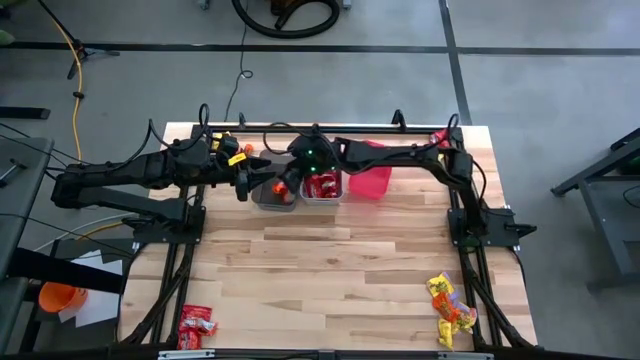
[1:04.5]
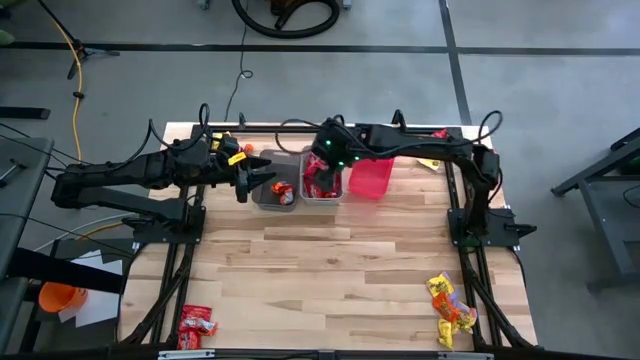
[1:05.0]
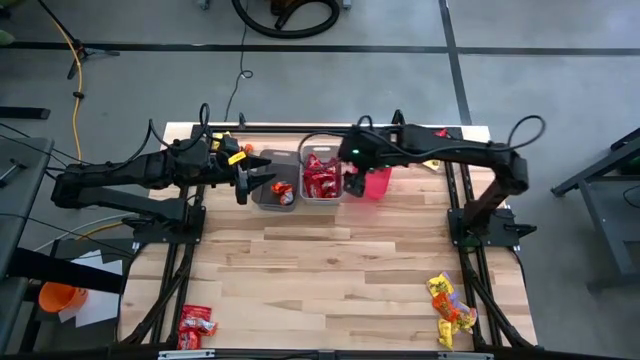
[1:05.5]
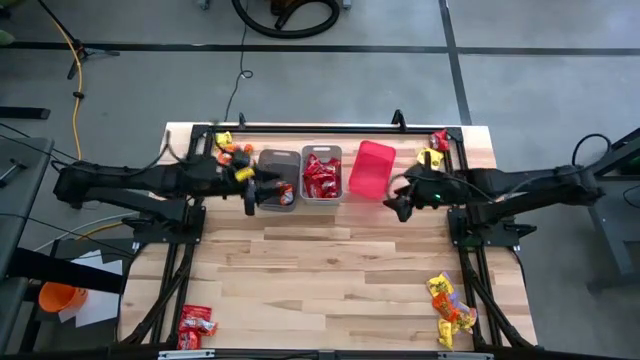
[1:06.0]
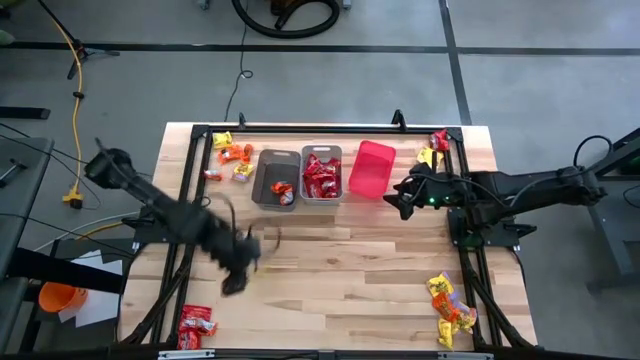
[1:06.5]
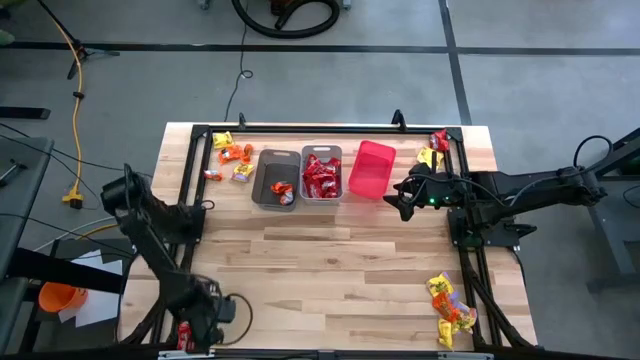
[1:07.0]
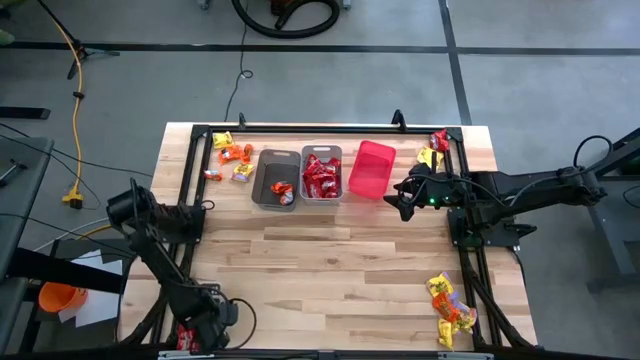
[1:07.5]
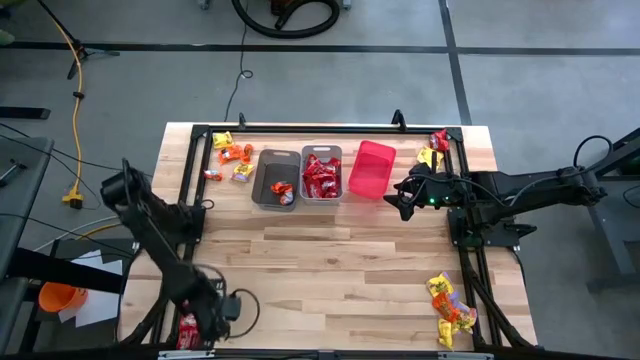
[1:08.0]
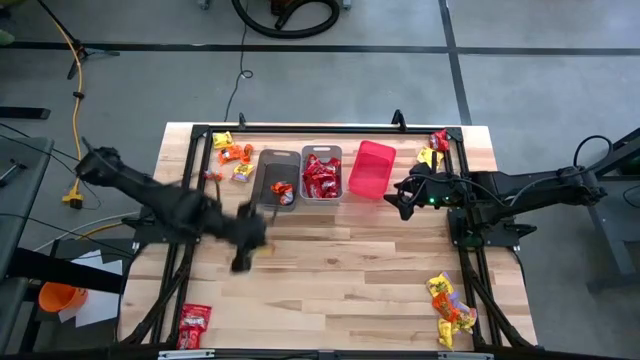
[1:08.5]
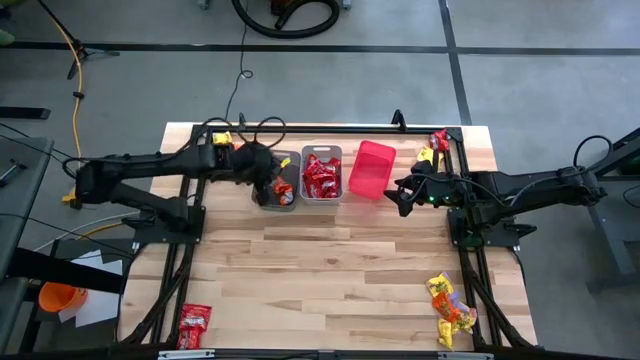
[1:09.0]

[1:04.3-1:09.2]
Task: Sort candy
Put the bottom left orange candy into the black bin

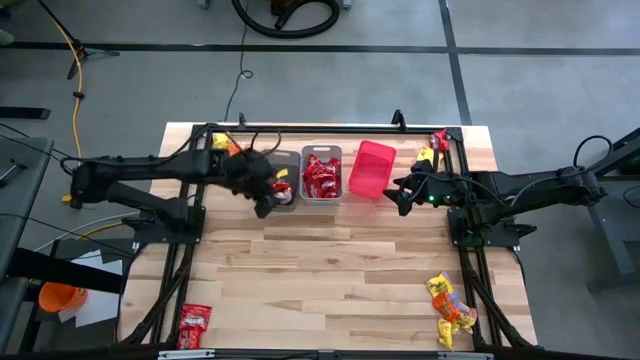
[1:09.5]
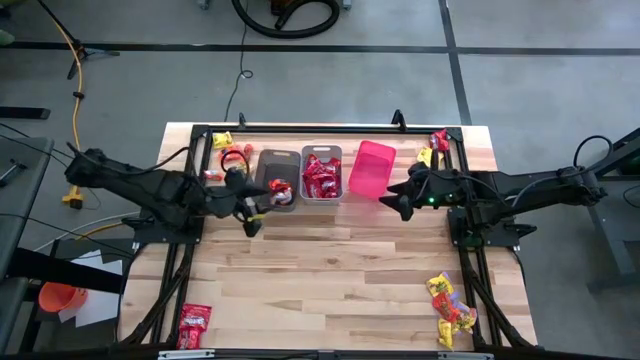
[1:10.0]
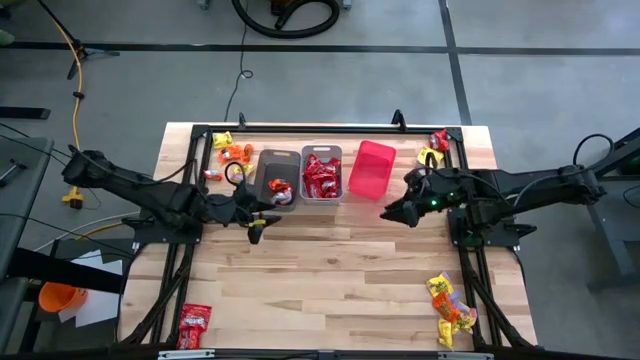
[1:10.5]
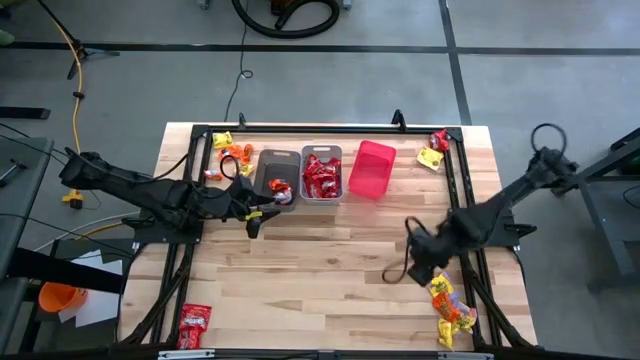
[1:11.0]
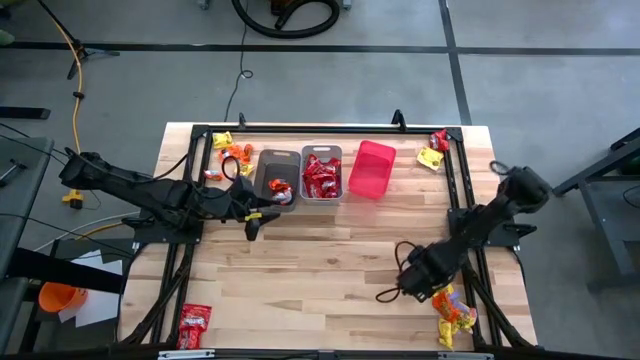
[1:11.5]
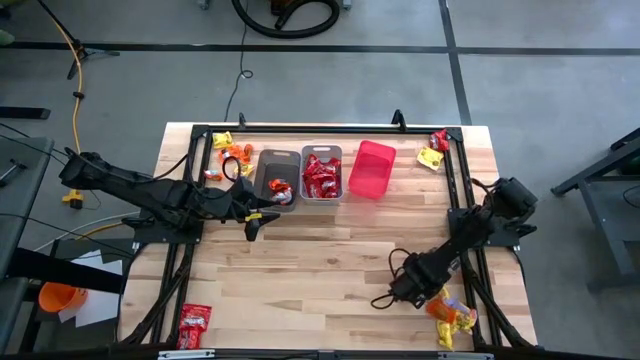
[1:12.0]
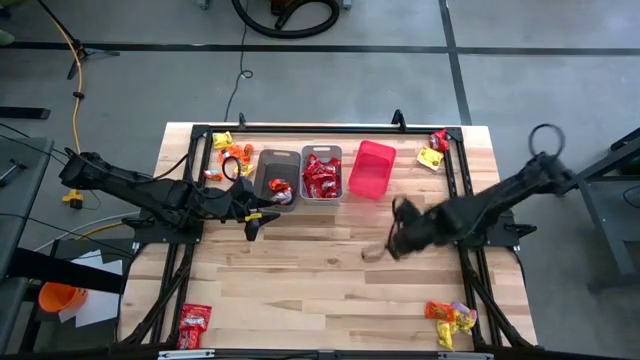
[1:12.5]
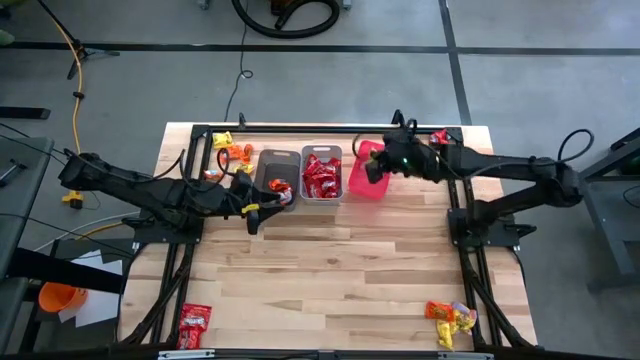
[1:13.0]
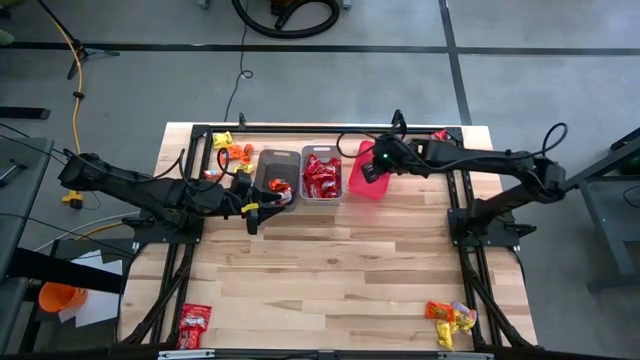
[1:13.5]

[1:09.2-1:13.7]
Put the bottom right yellow candy into the red bin

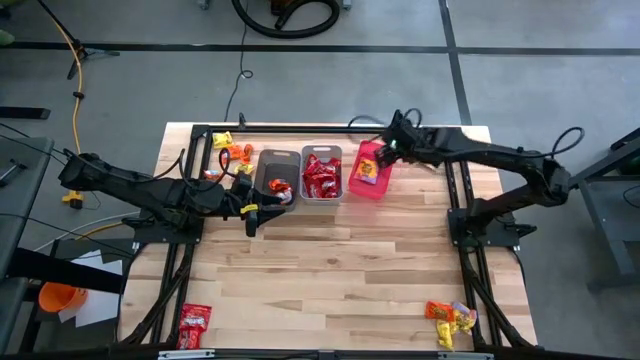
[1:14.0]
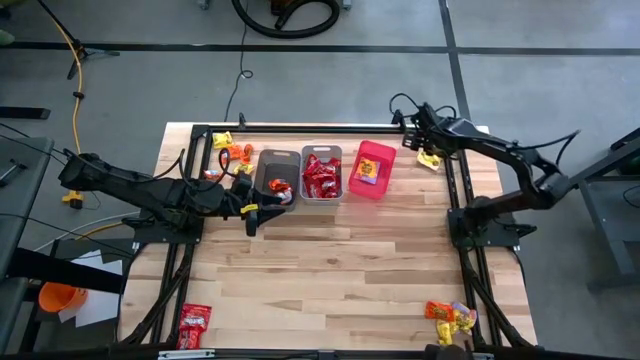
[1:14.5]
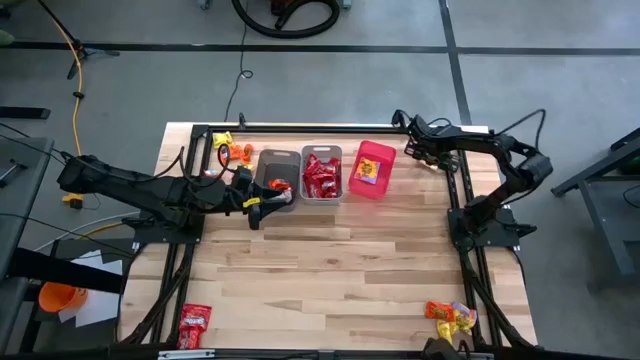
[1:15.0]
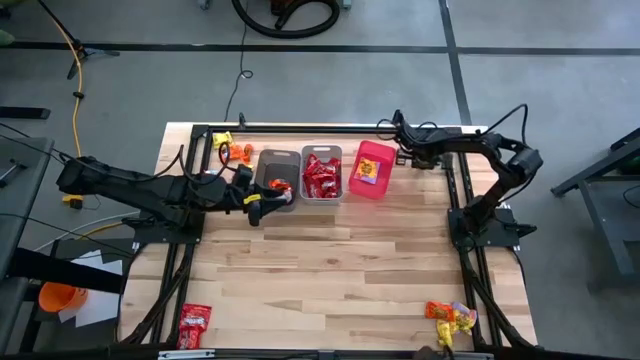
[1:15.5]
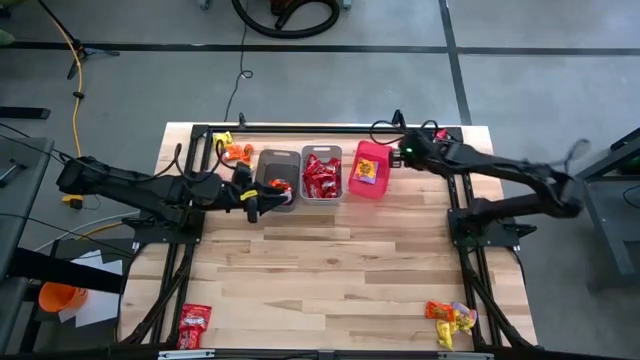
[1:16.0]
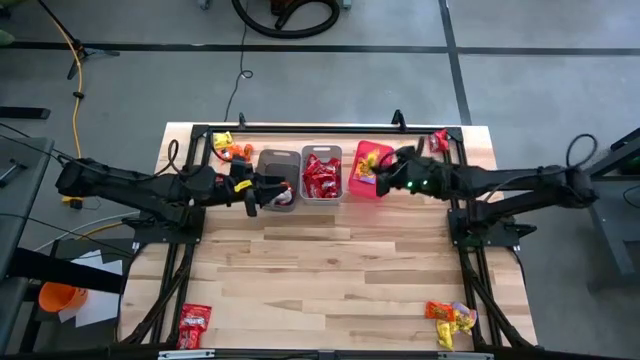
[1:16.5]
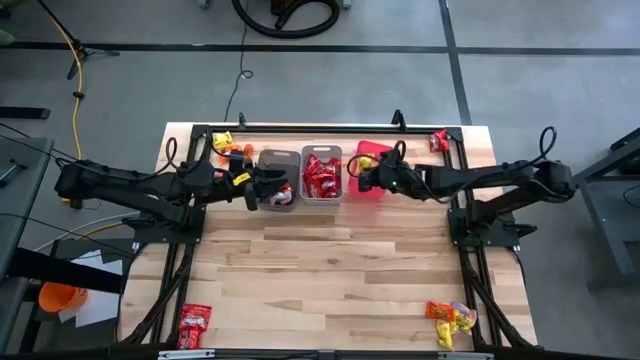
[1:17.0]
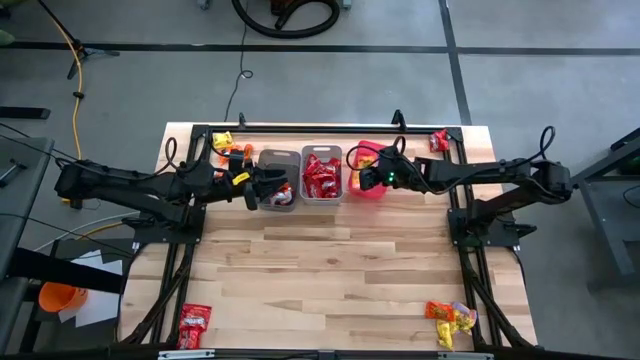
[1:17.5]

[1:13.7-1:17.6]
Put the top right yellow candy into the red bin

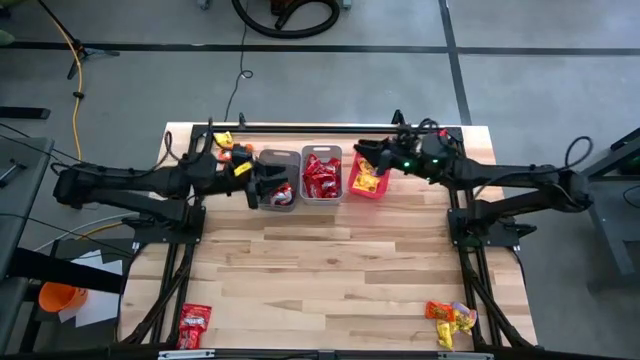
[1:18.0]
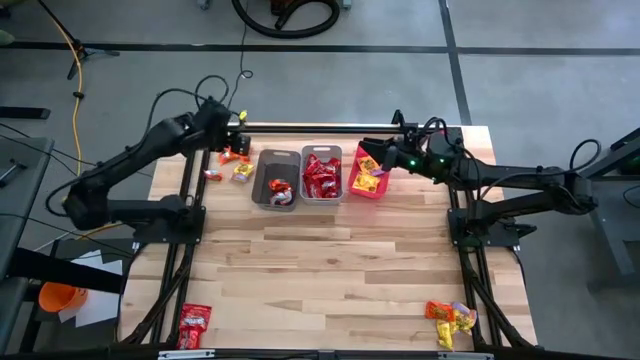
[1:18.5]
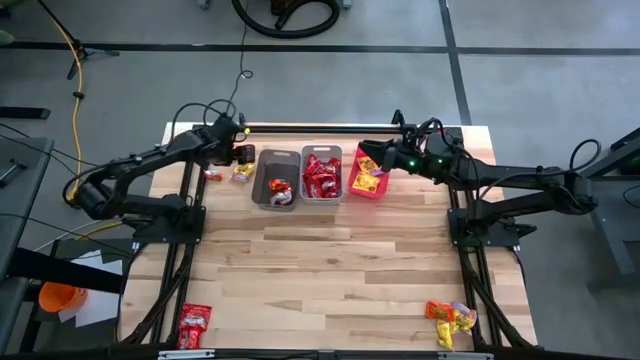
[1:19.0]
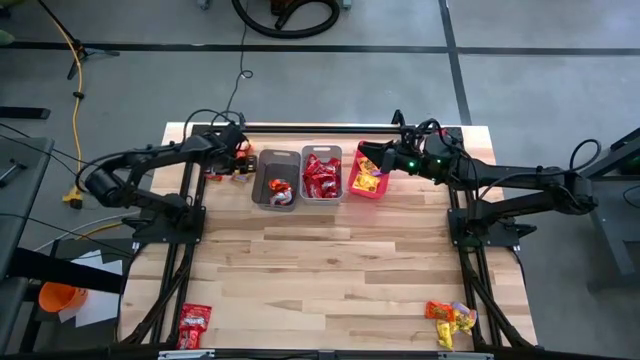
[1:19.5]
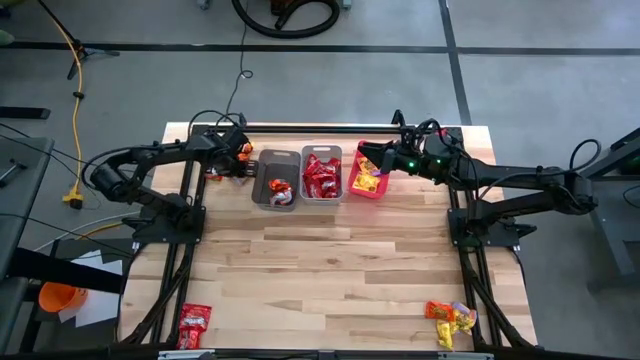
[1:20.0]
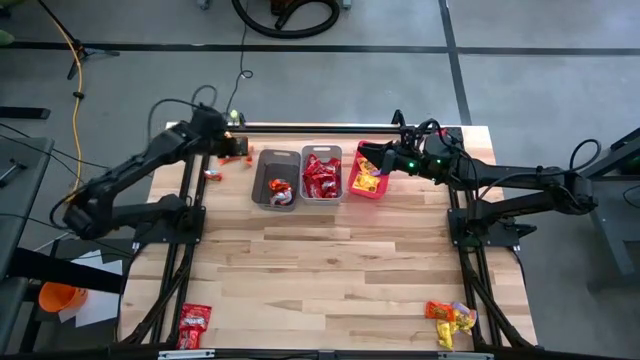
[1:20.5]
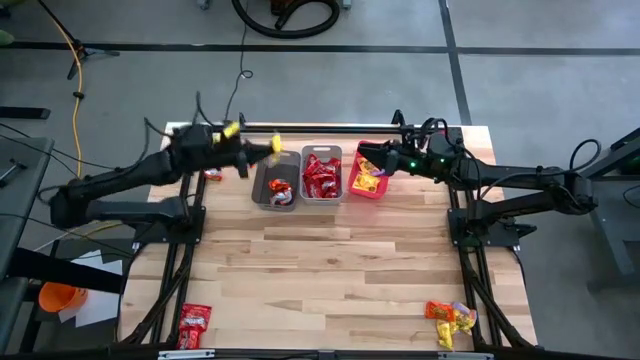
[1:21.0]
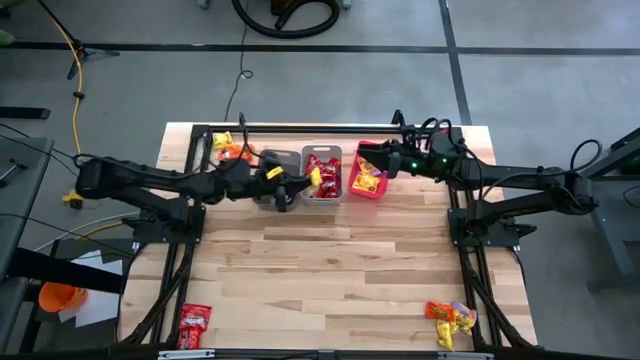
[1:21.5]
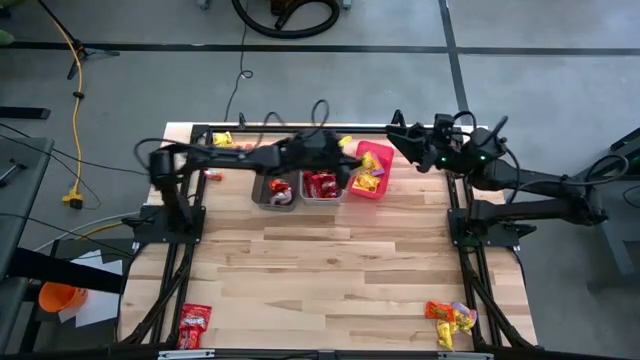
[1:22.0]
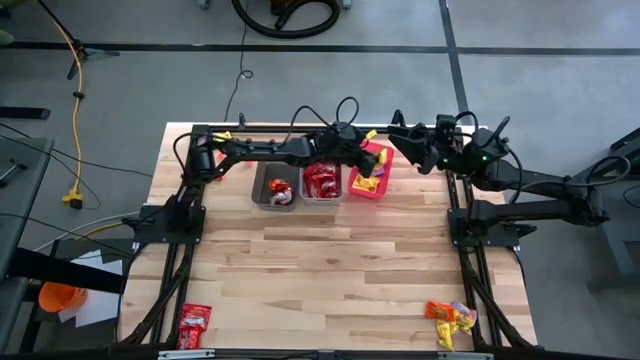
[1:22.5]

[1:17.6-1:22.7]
Put the top left yellow candy into the red bin

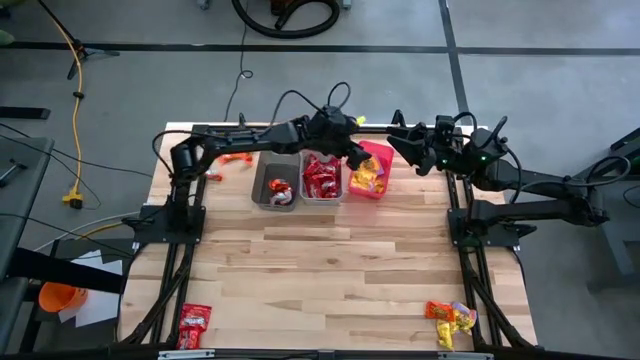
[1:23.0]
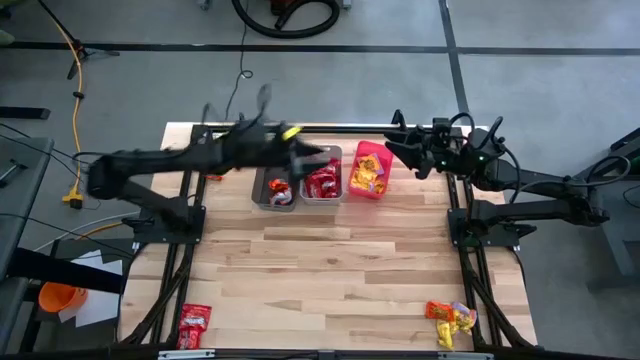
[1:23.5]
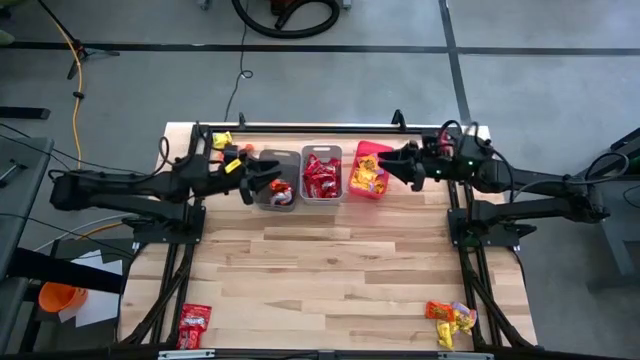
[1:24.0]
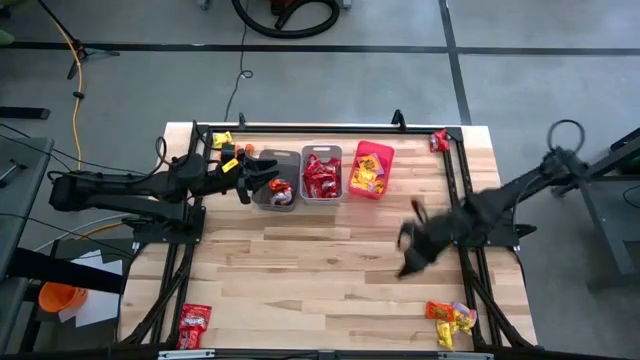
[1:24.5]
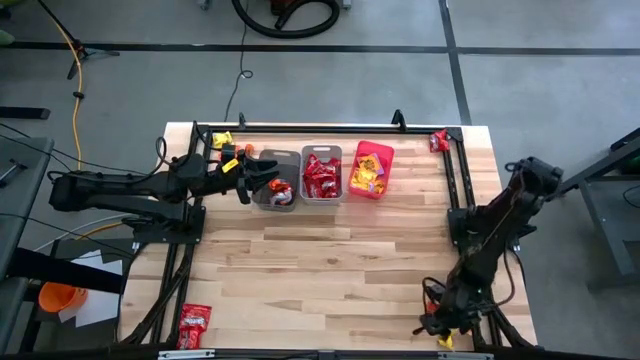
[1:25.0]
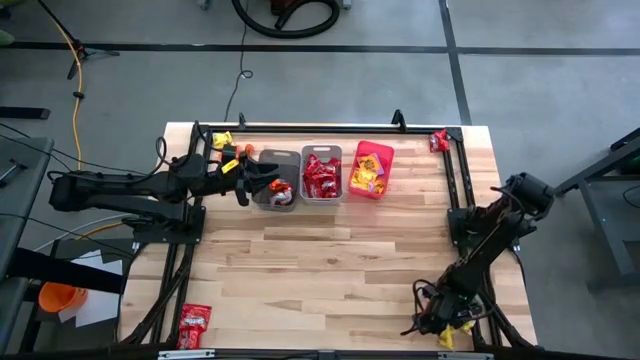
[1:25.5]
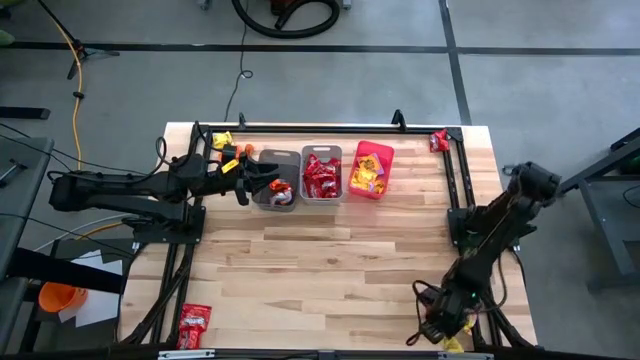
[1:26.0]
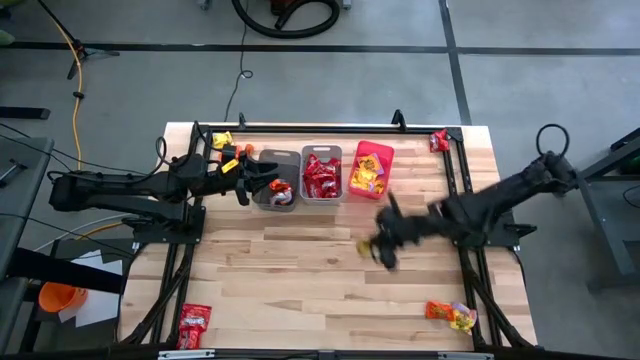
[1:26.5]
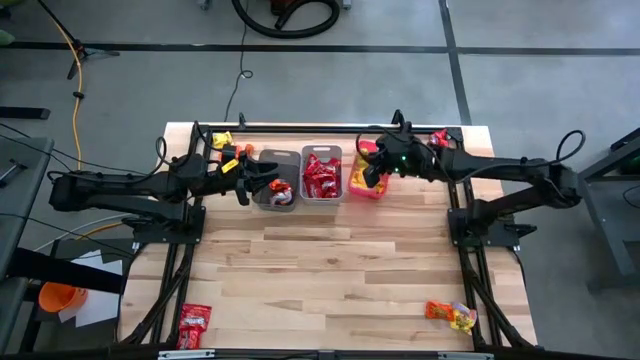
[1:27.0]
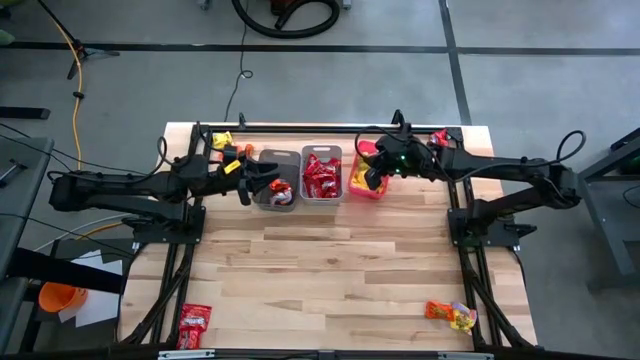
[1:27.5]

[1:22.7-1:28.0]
Put the bottom right yellow candy into the red bin
